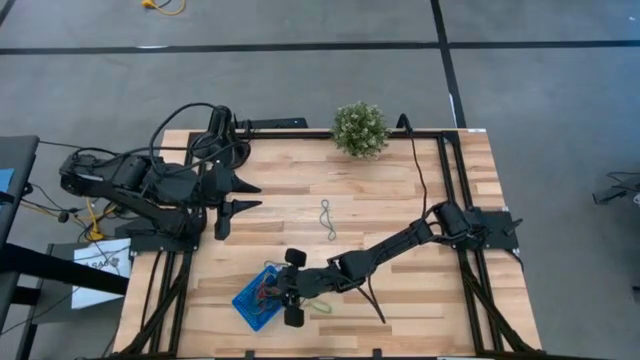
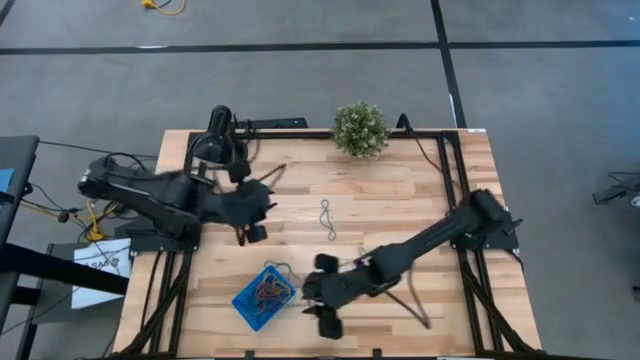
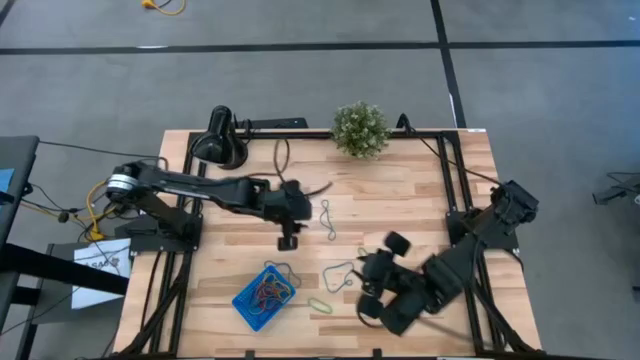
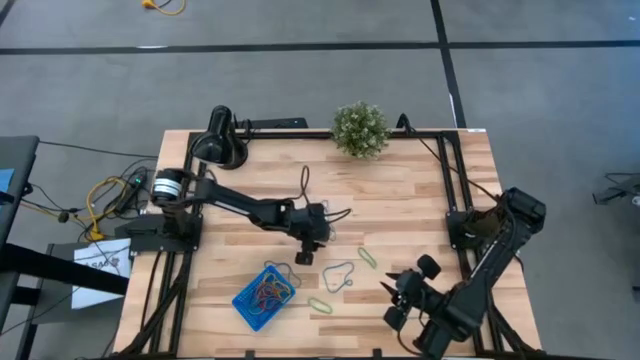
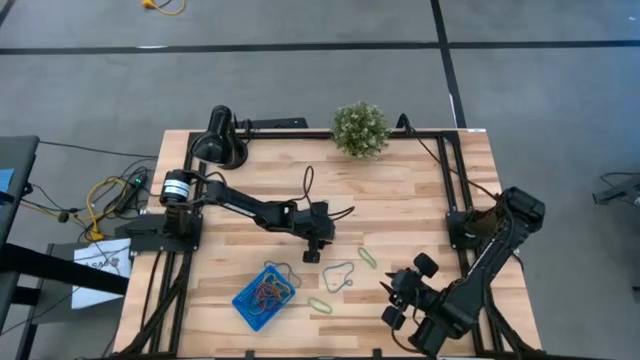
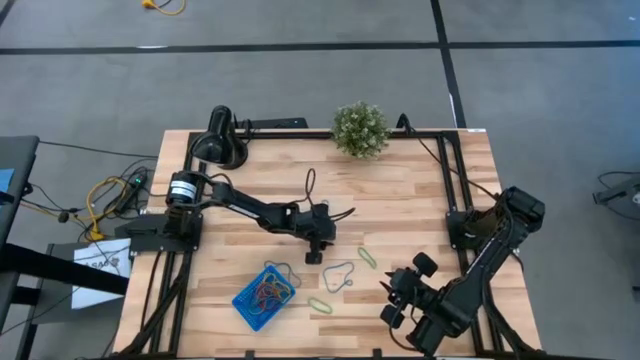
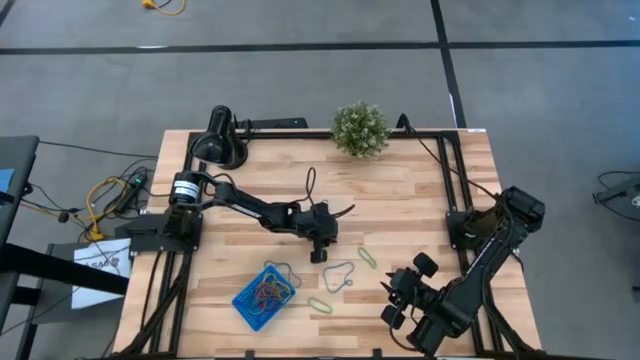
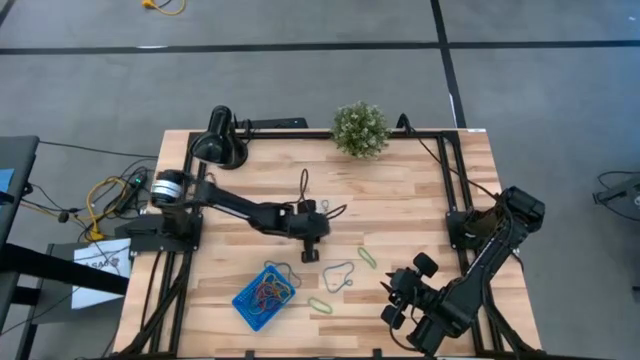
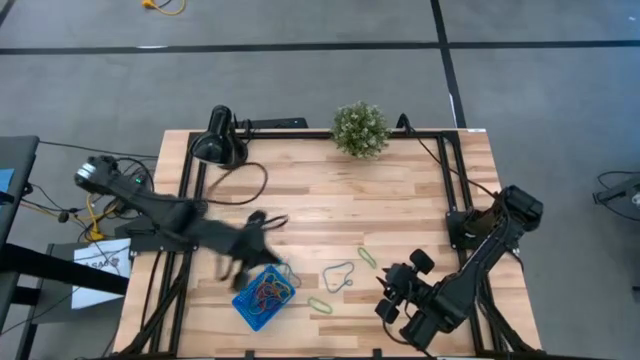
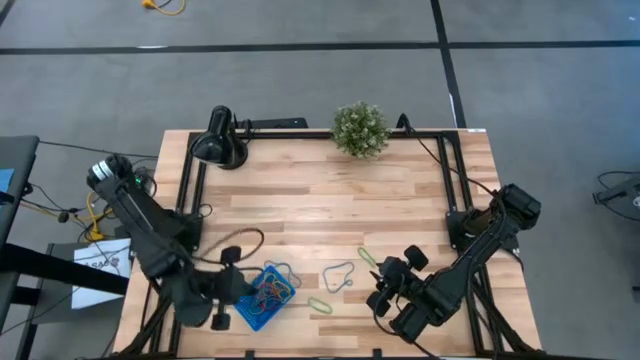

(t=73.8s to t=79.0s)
Task: Pick and place rubber bands into bin
Put the blue rubber band into the blue basket

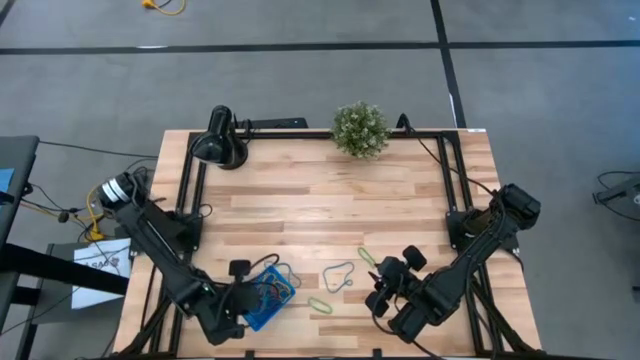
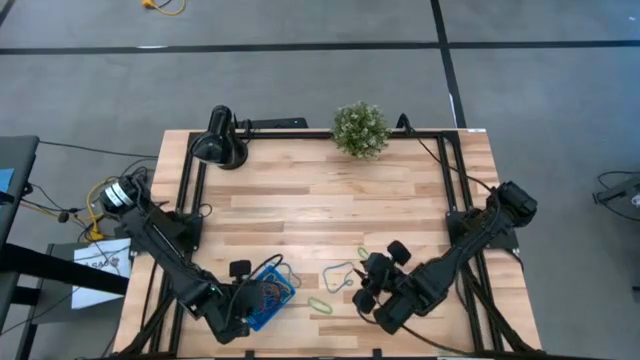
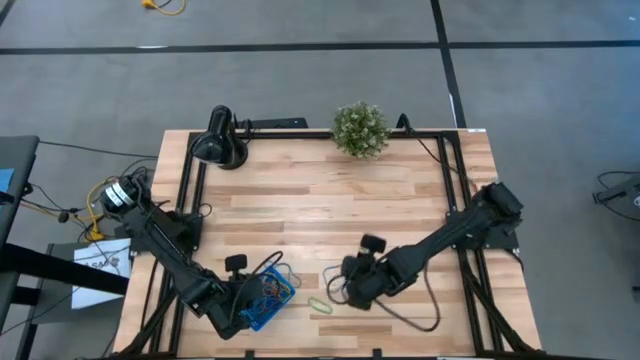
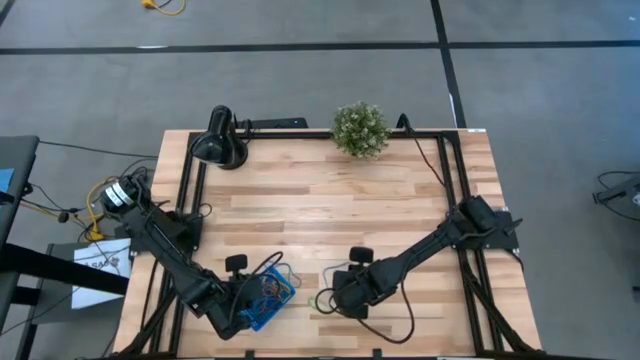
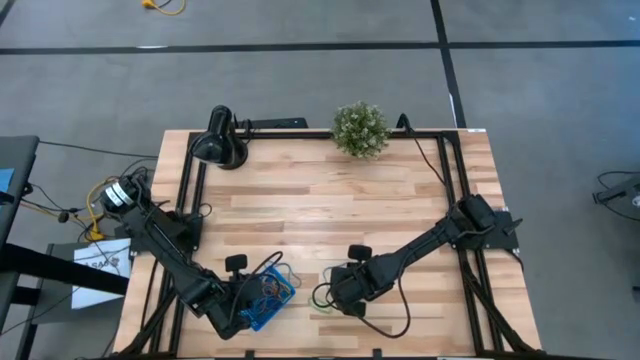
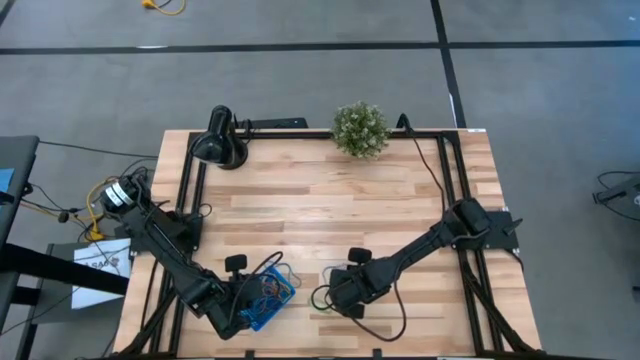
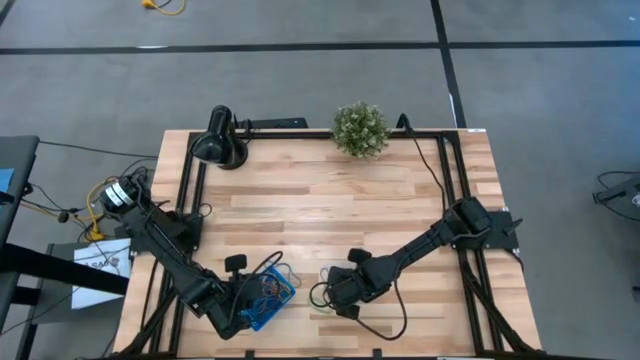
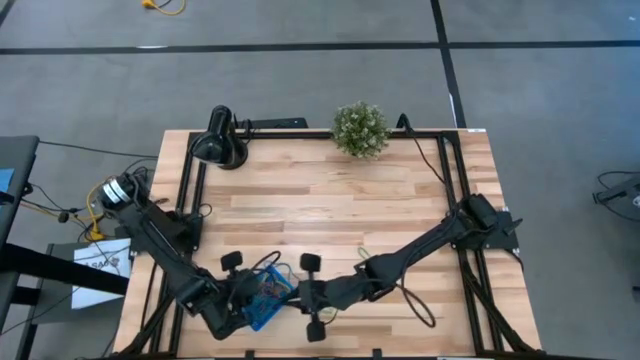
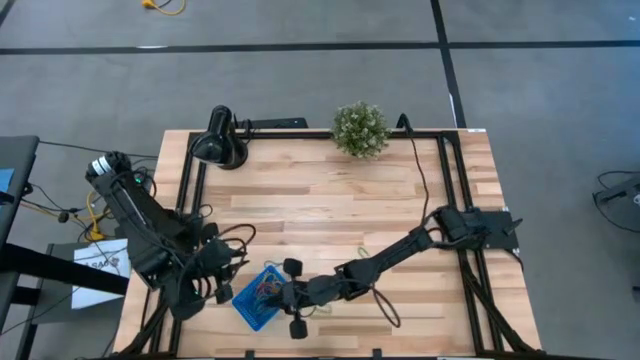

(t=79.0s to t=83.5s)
Put the blue rubber band into the blue basket

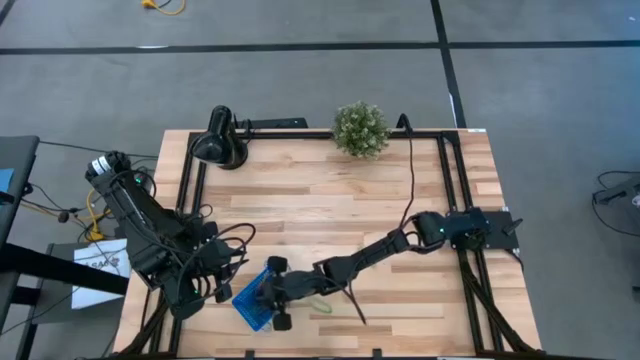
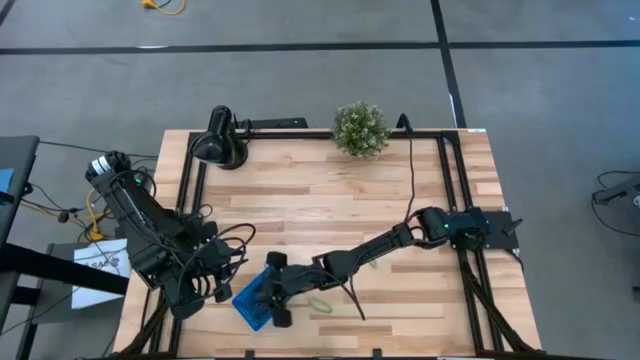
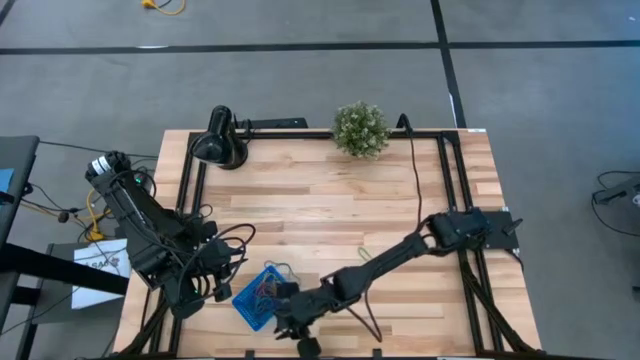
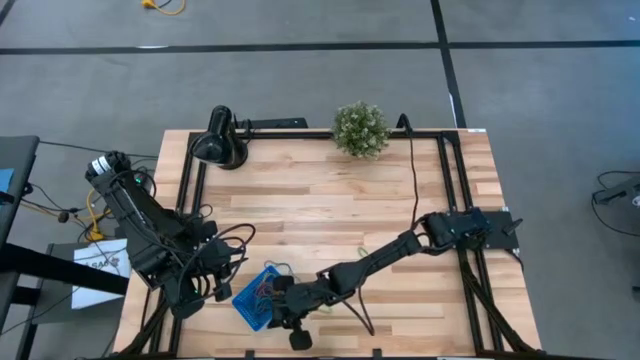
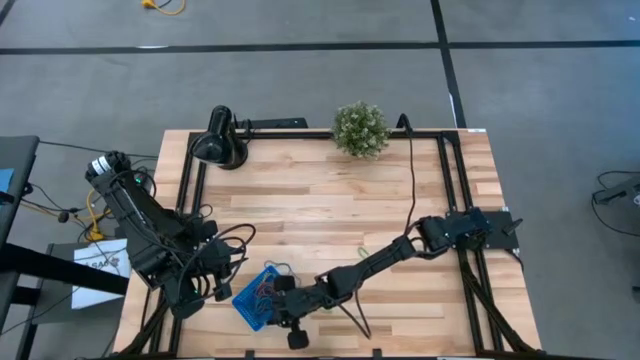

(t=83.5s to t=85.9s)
Adjust the blue basket

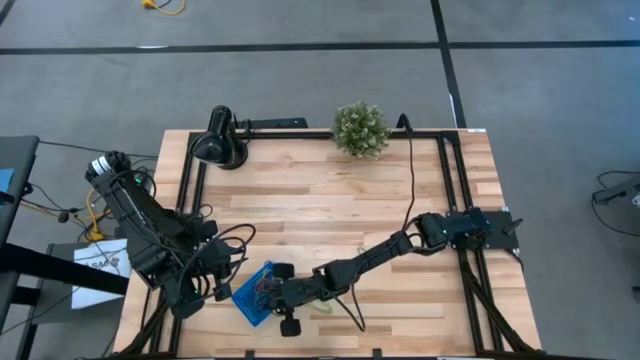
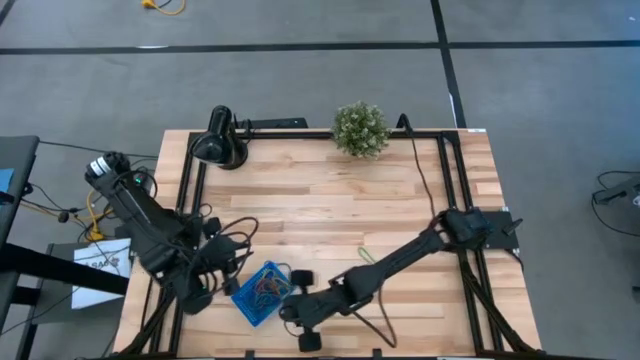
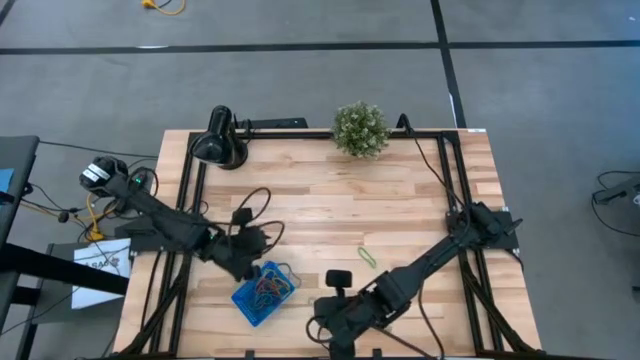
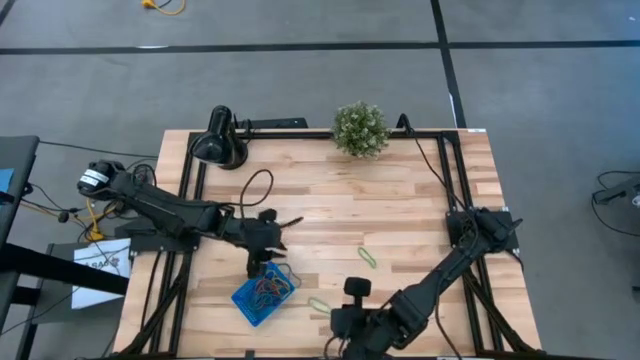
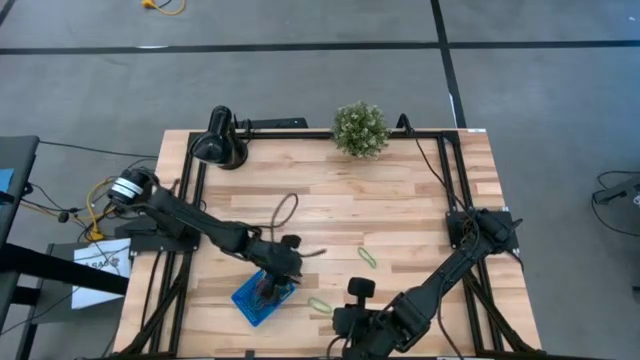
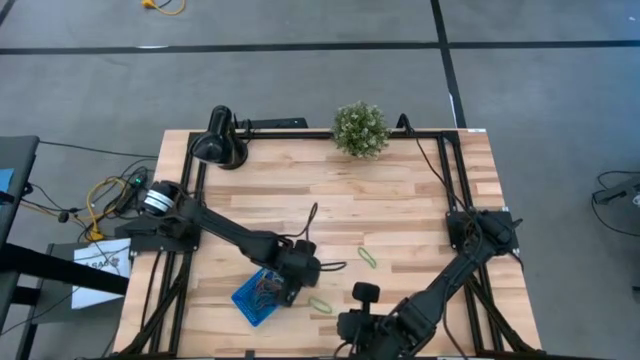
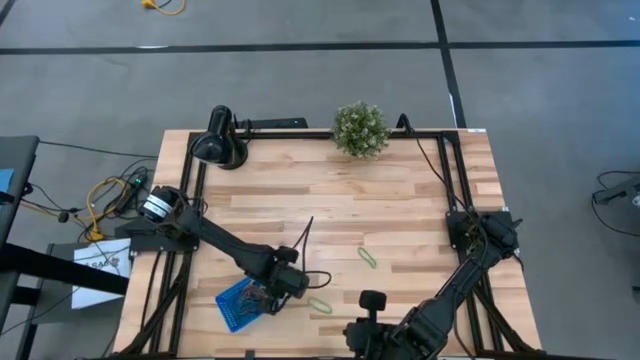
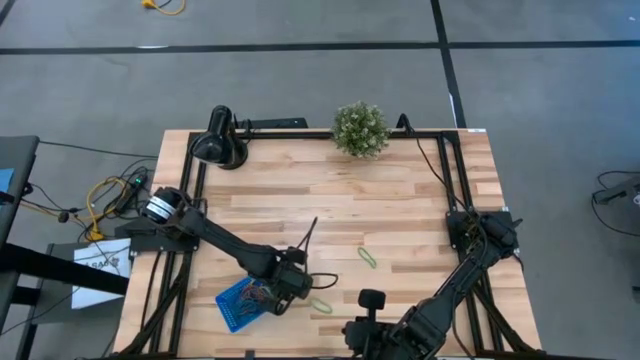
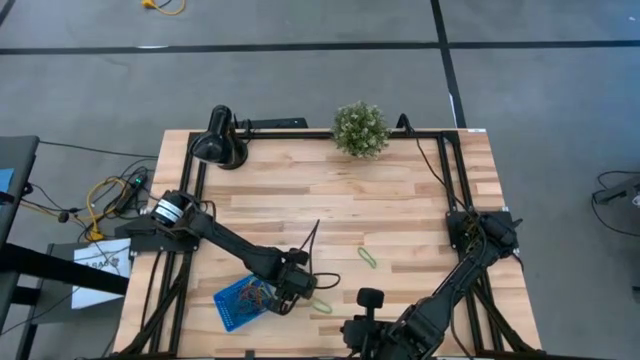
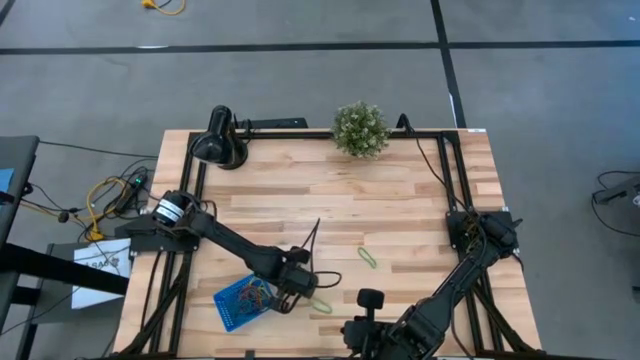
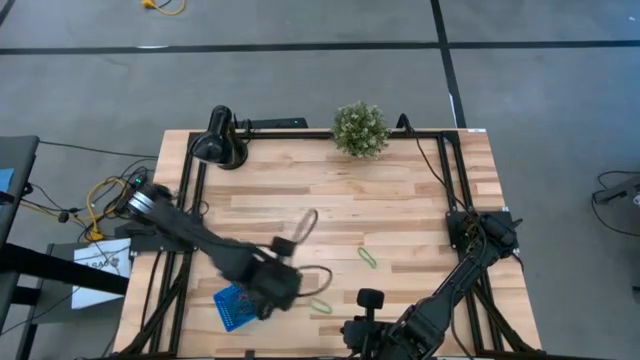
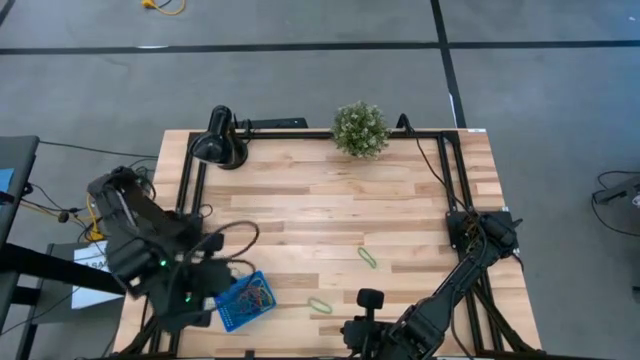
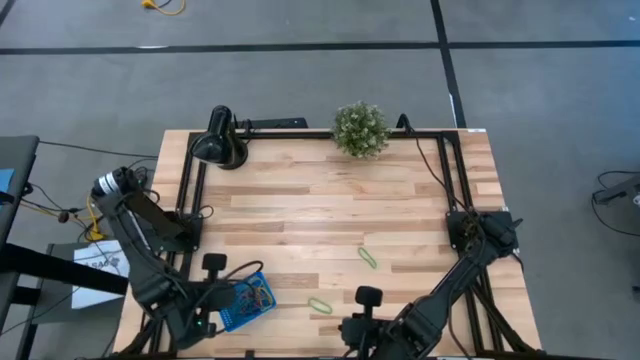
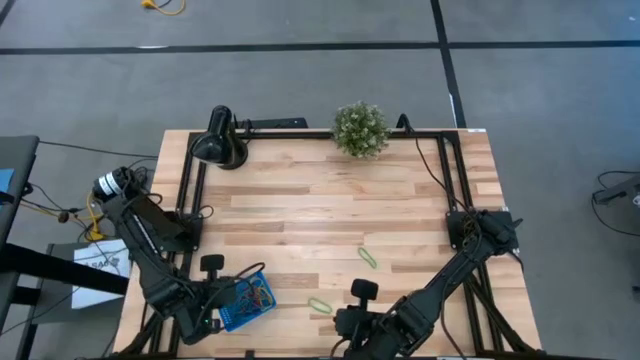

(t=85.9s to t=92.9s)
Put the blue rubber band into the blue basket

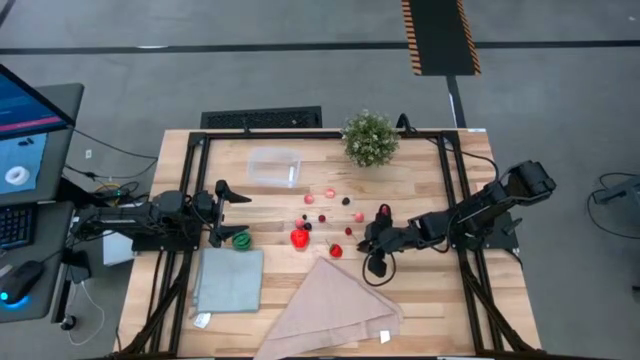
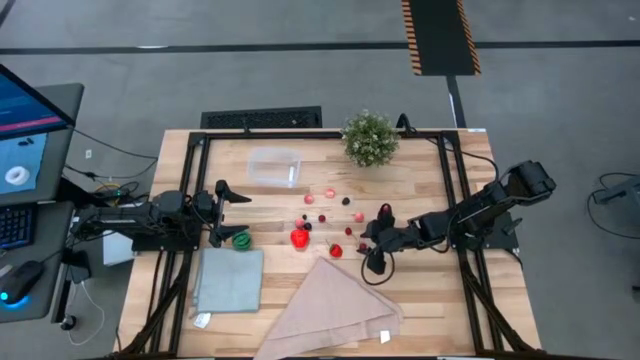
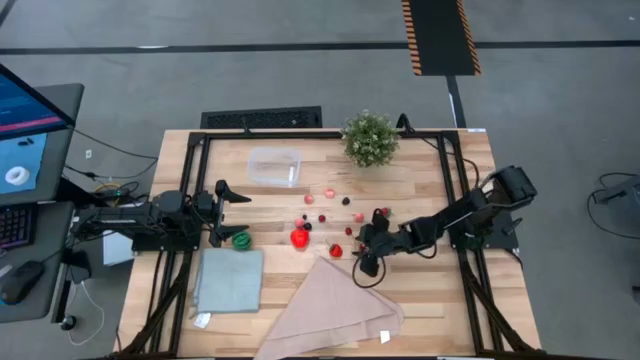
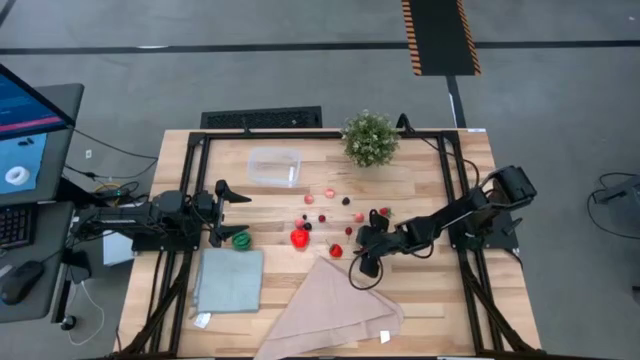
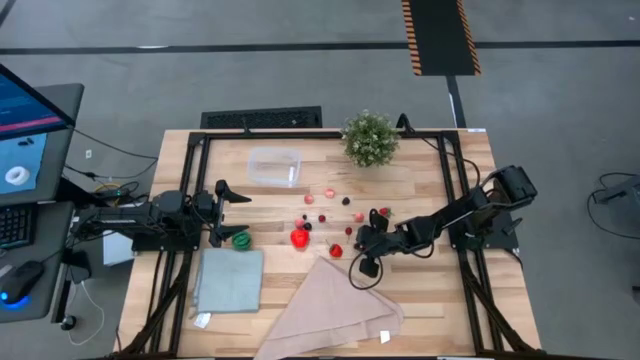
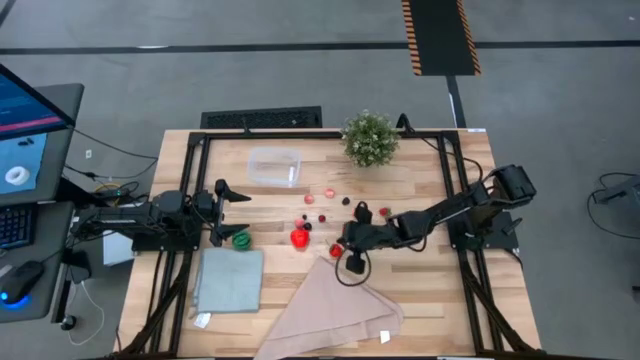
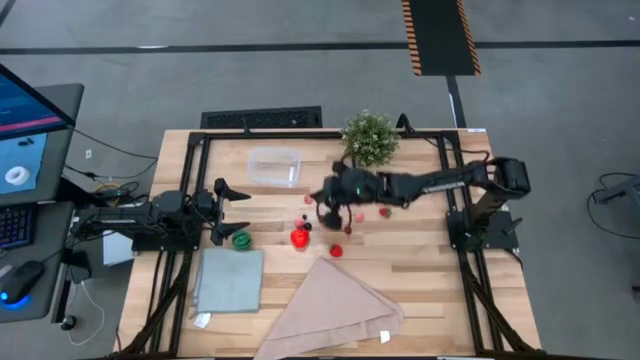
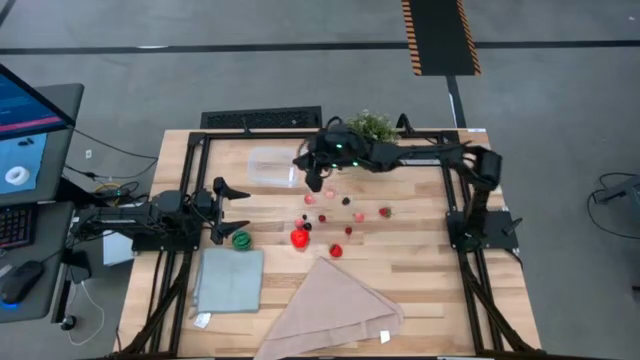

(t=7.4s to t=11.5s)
Task: Pick and placing Produce into tupperware
Put the red cherry into the transparent container
